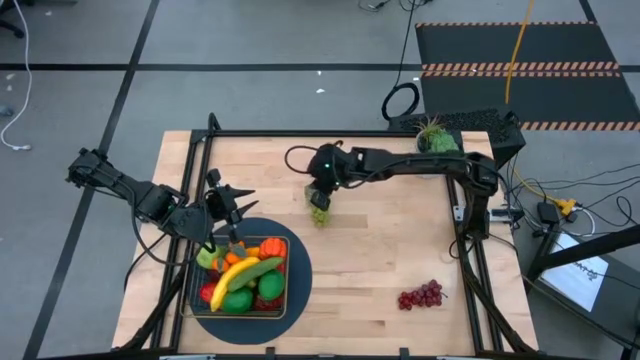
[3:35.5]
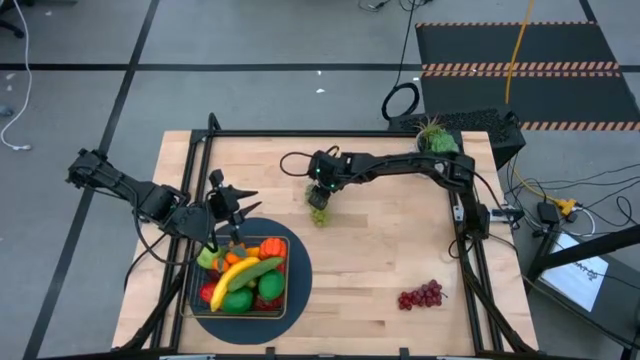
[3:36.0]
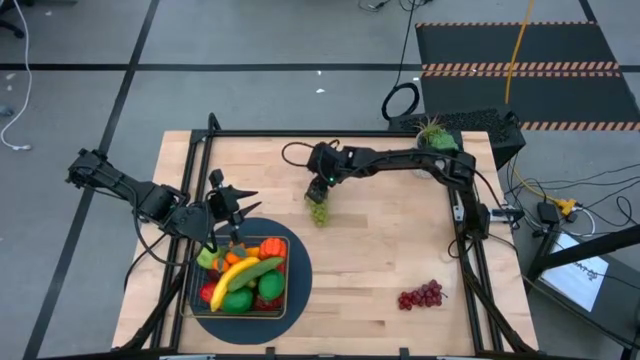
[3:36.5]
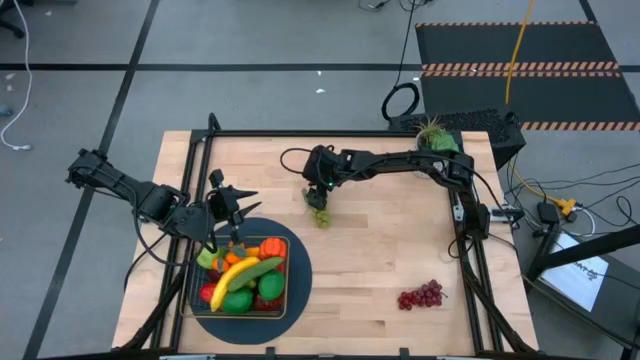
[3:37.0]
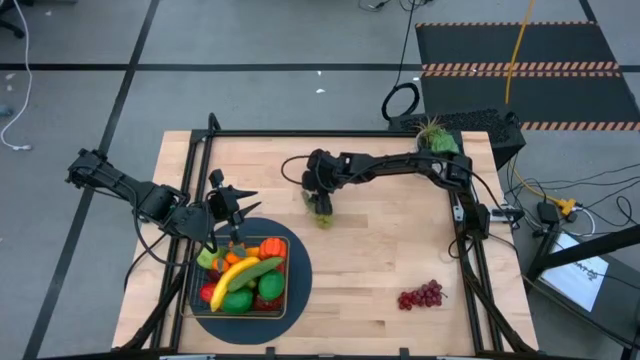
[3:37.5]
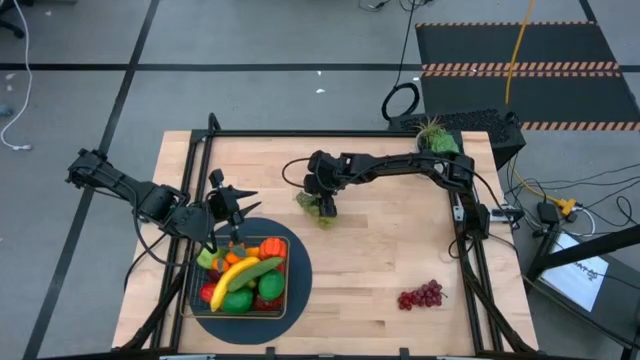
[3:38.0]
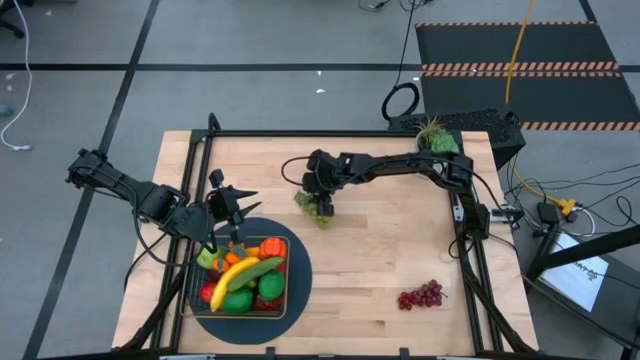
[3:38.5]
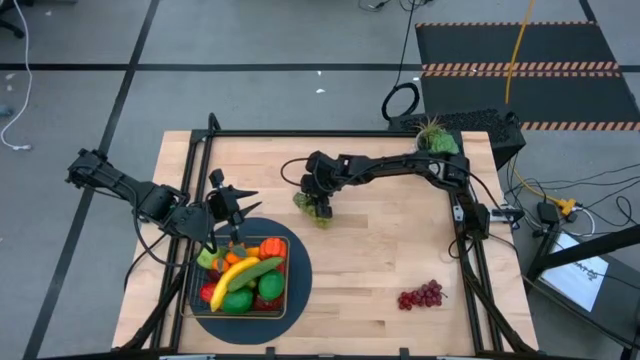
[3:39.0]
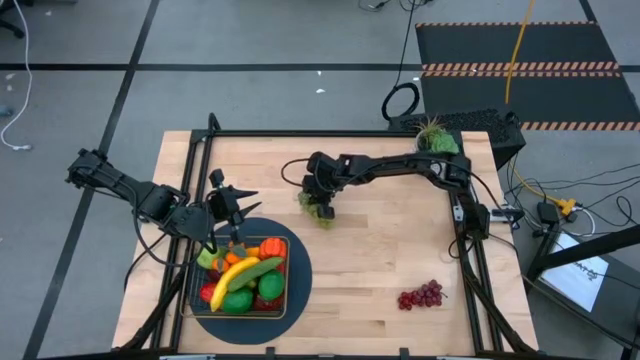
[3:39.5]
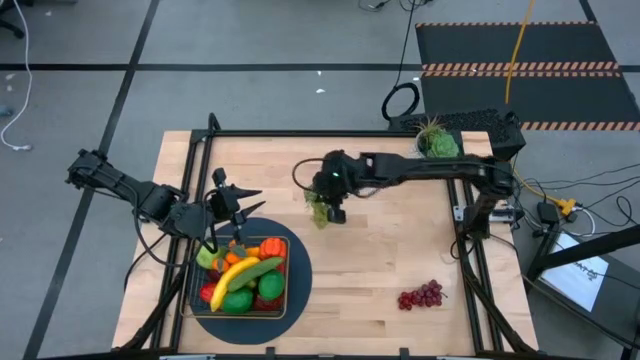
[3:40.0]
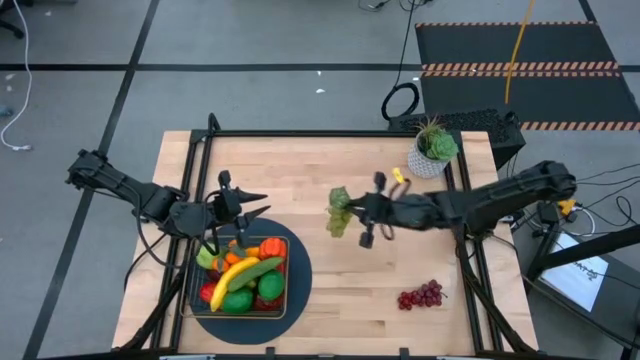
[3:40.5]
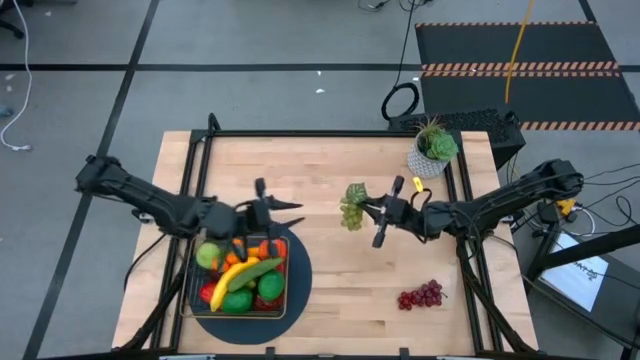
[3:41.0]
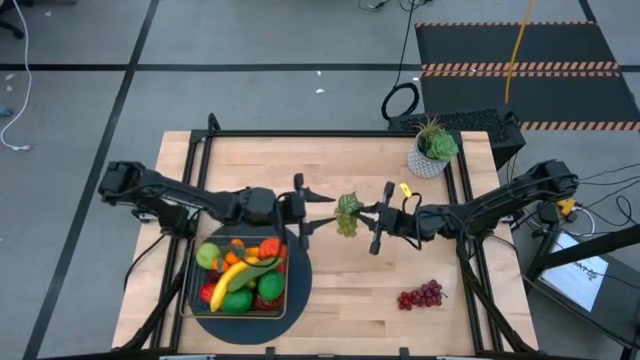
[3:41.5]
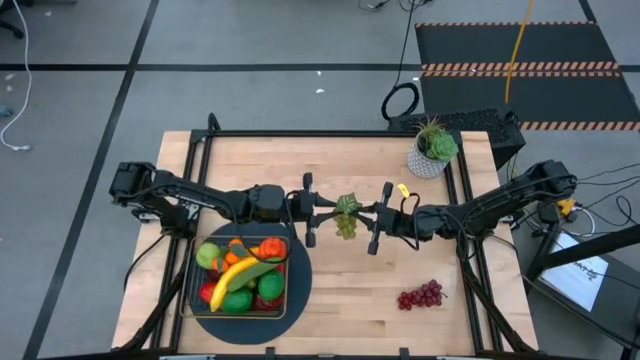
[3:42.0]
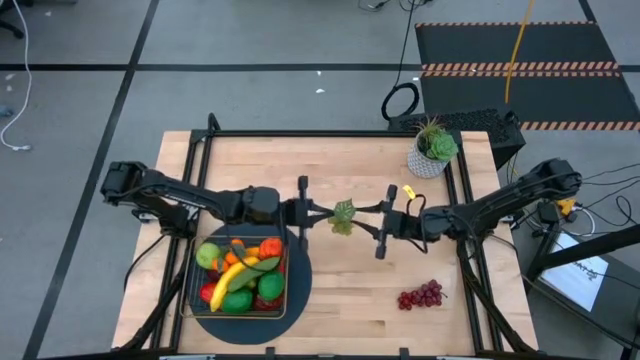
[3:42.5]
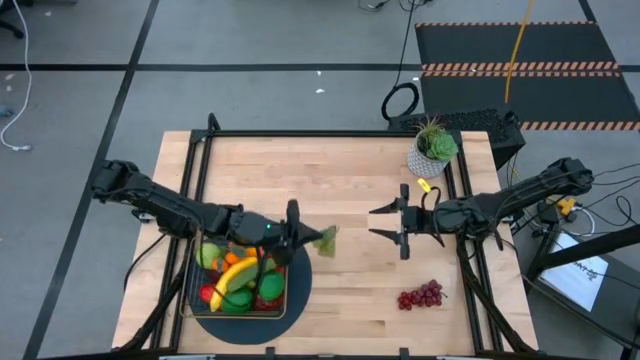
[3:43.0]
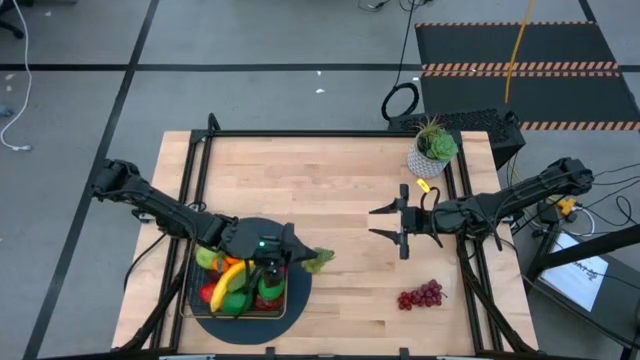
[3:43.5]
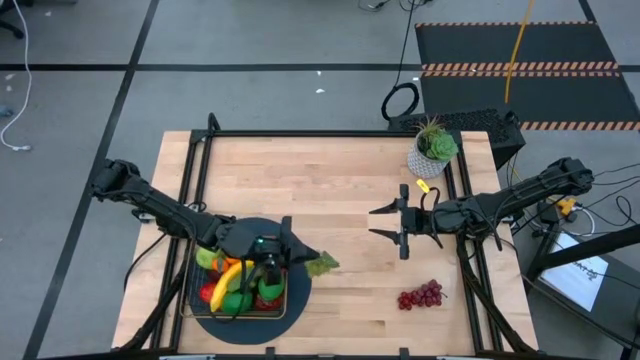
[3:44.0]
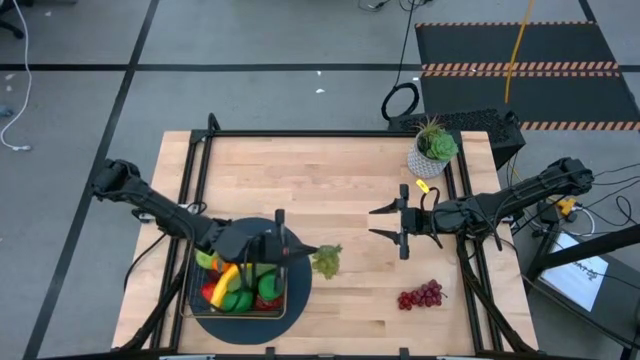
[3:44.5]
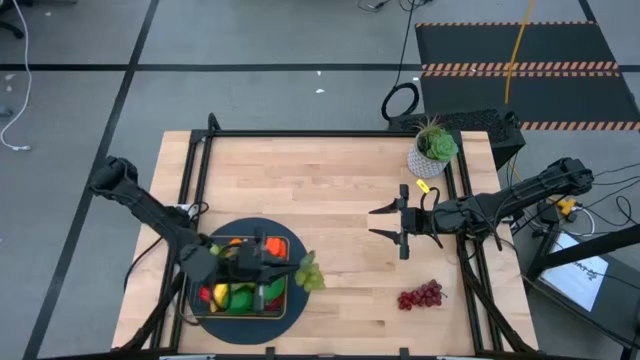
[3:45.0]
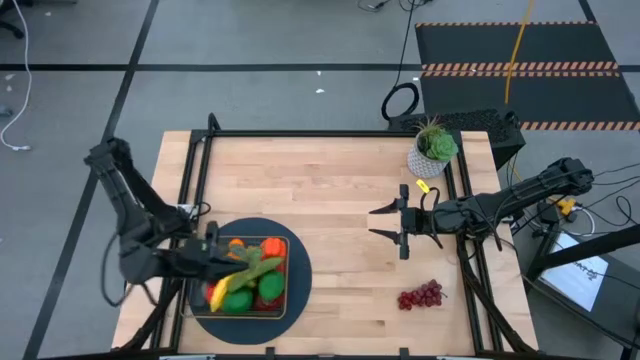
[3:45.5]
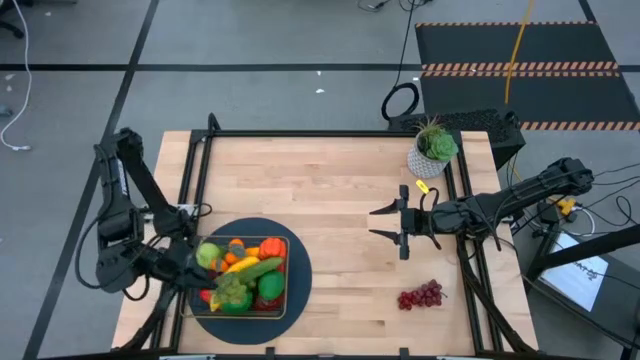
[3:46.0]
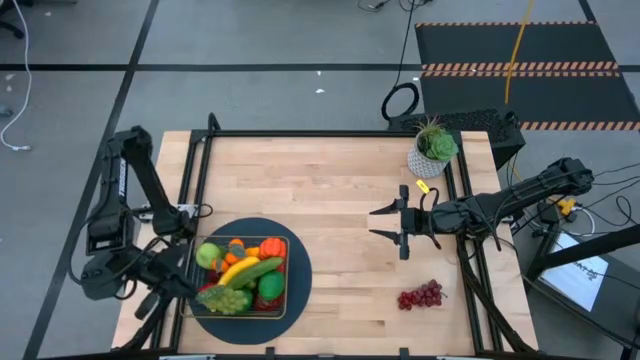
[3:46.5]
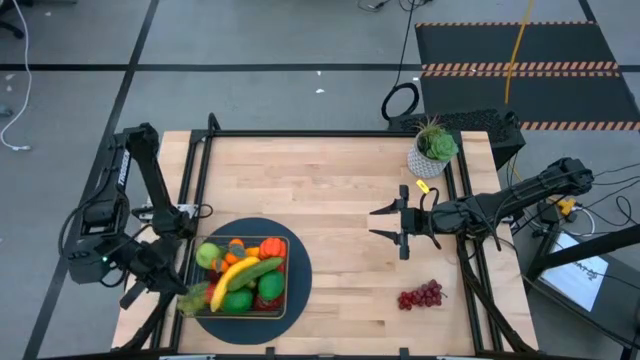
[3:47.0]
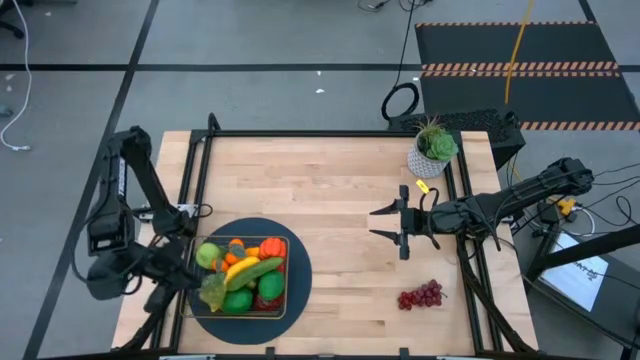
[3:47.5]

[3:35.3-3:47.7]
Task: Build produce basket
Put the green grapes into the gold wire basket

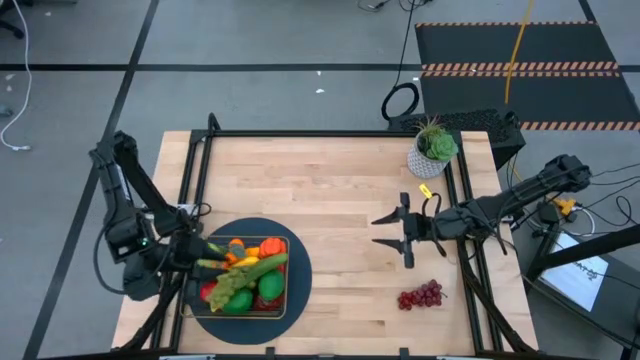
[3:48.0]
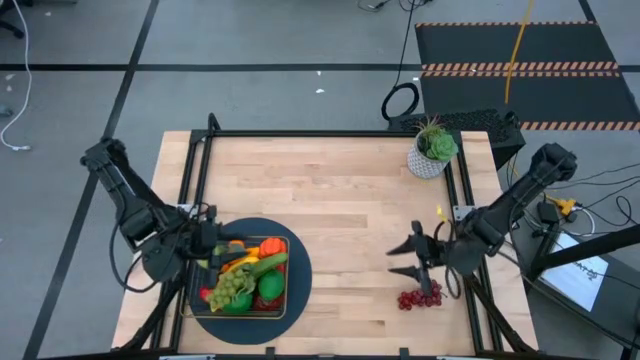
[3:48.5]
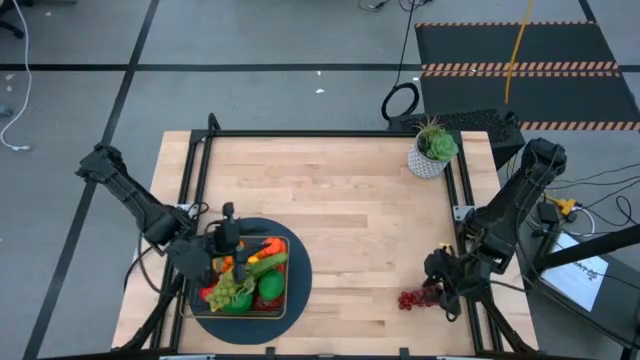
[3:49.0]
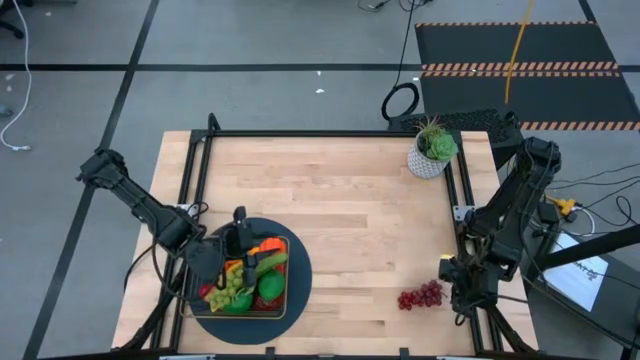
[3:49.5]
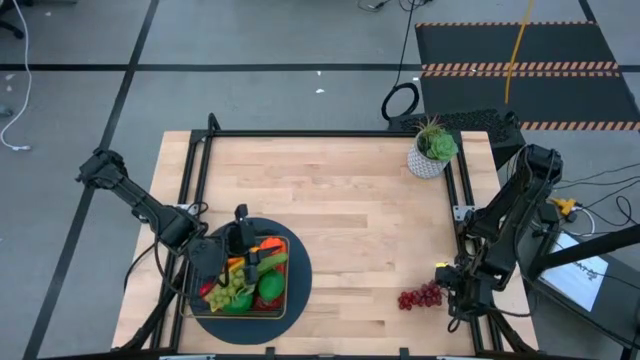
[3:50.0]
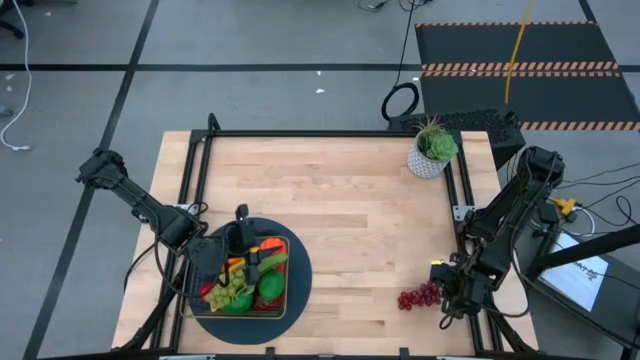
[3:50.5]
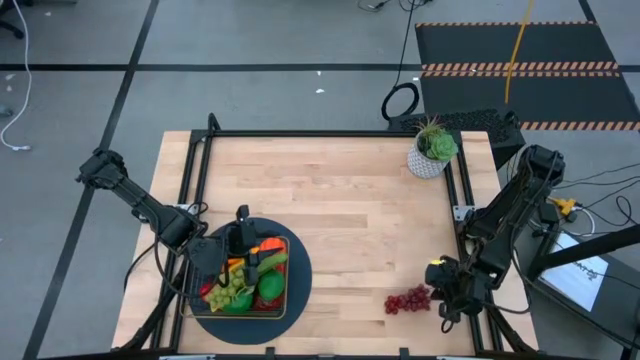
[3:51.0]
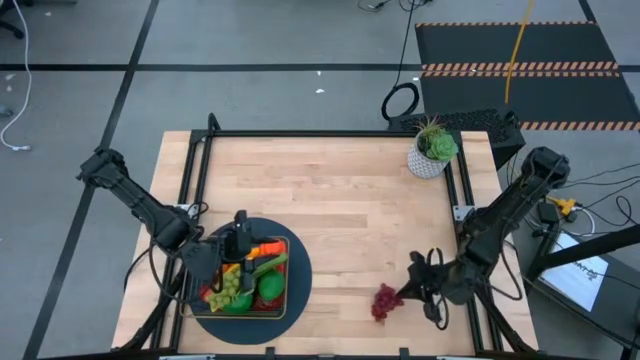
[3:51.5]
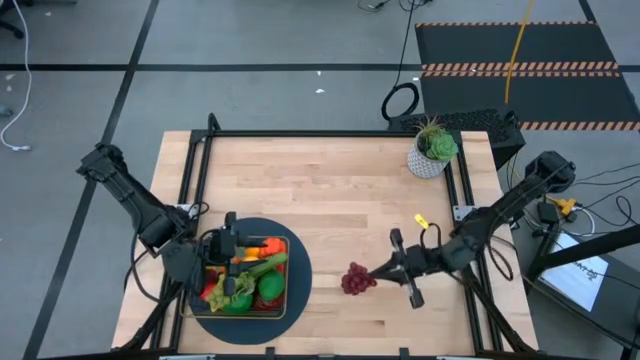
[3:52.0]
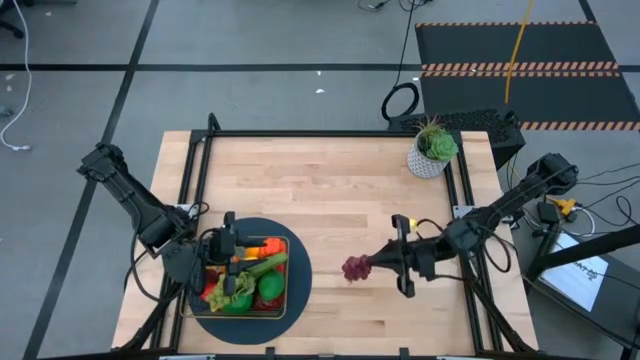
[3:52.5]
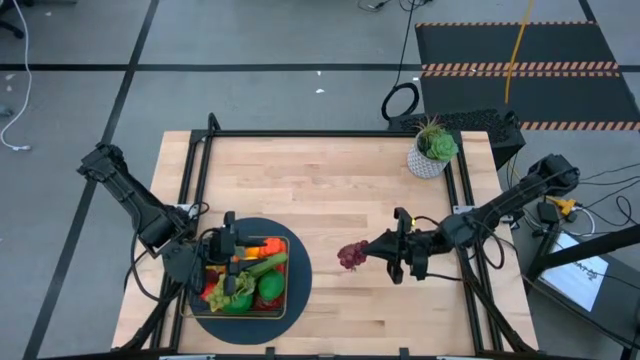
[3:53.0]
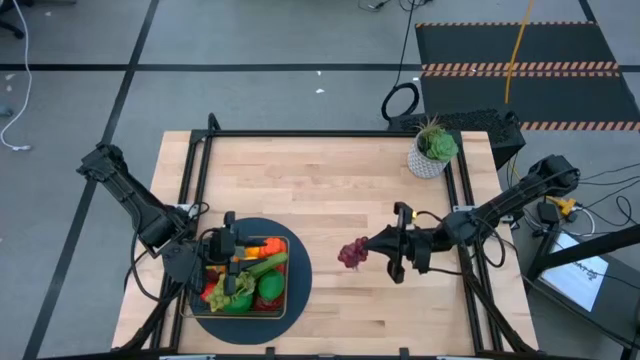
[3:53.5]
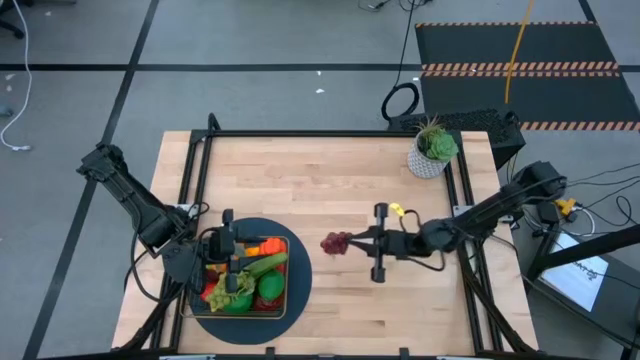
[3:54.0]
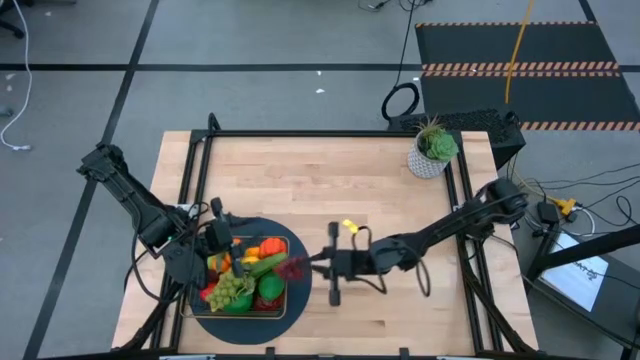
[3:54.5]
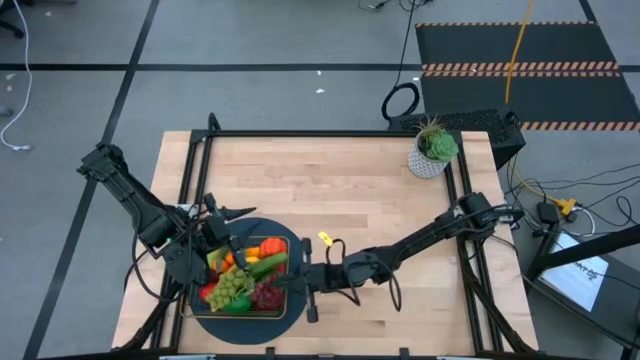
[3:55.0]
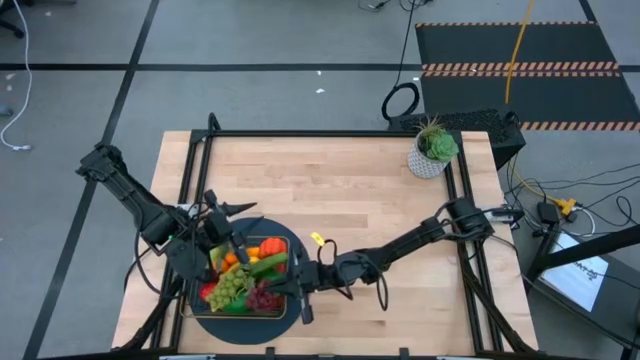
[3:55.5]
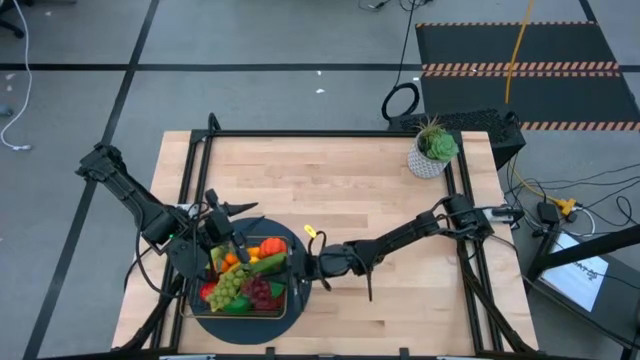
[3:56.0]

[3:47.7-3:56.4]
Put the red grapes into the gold wire basket
